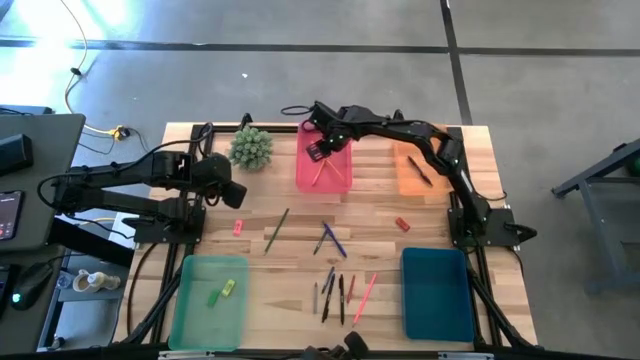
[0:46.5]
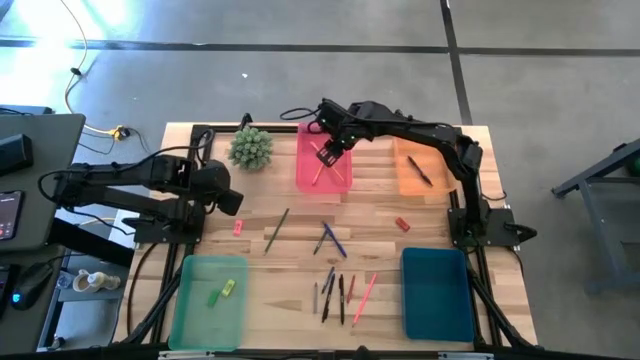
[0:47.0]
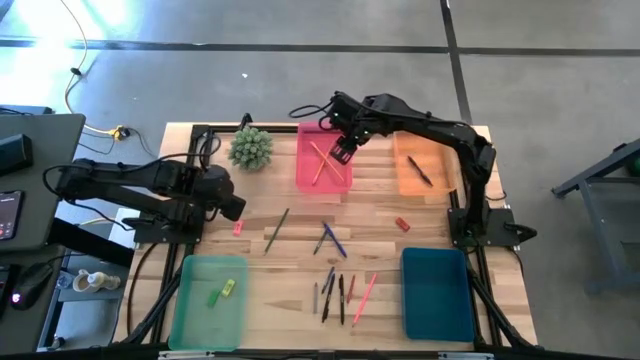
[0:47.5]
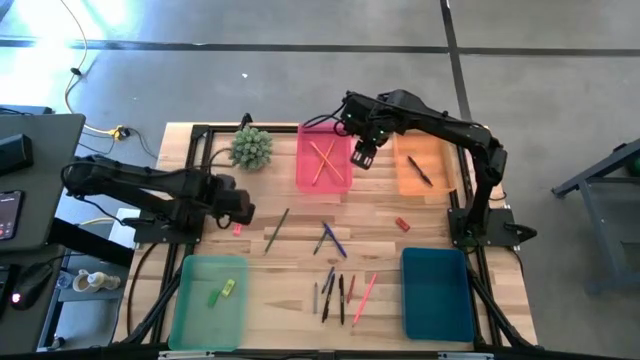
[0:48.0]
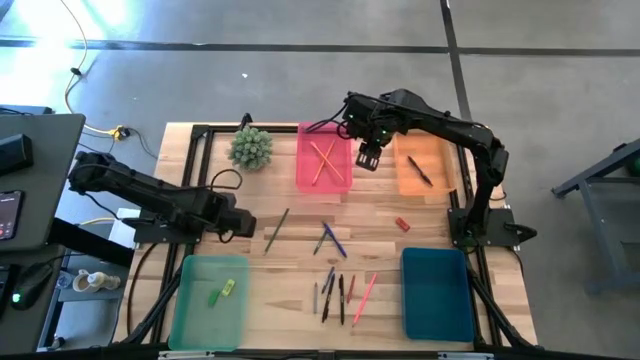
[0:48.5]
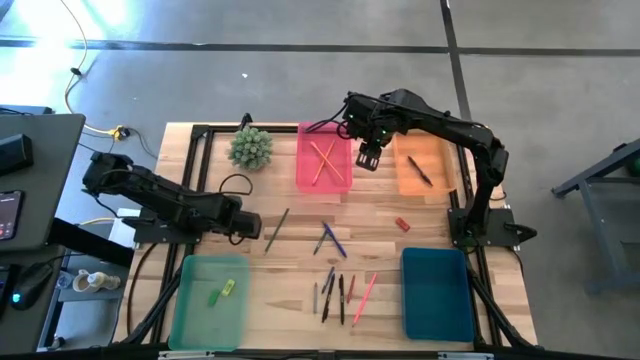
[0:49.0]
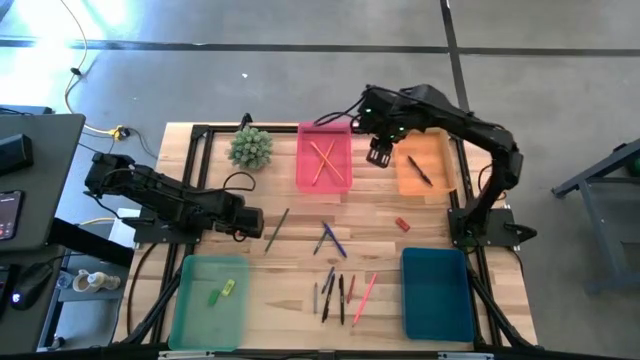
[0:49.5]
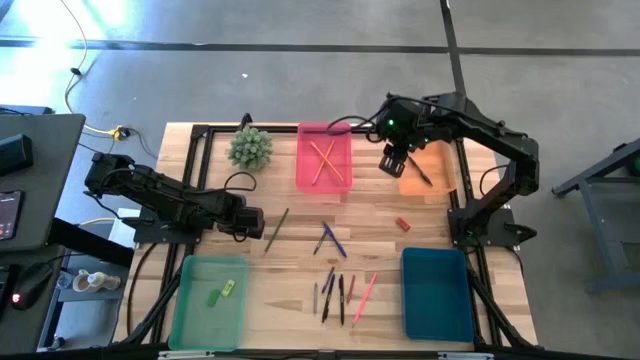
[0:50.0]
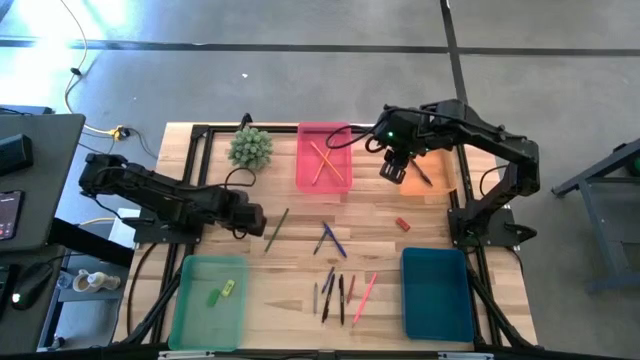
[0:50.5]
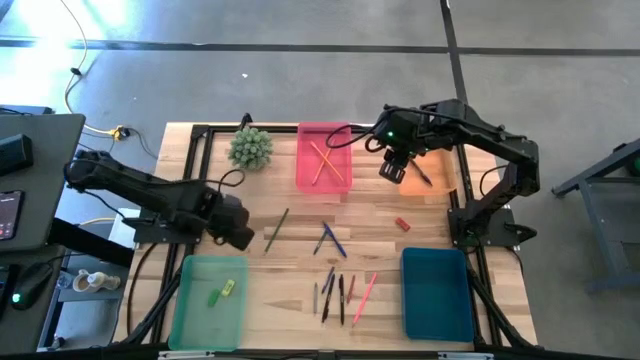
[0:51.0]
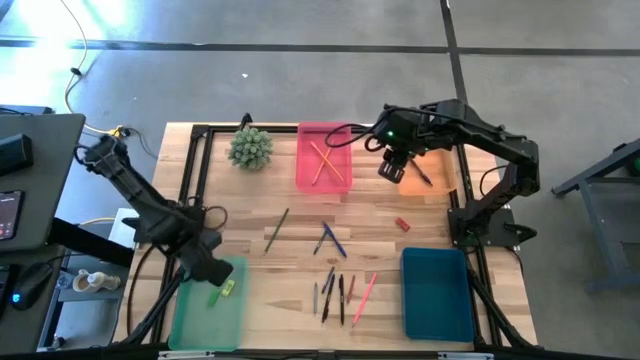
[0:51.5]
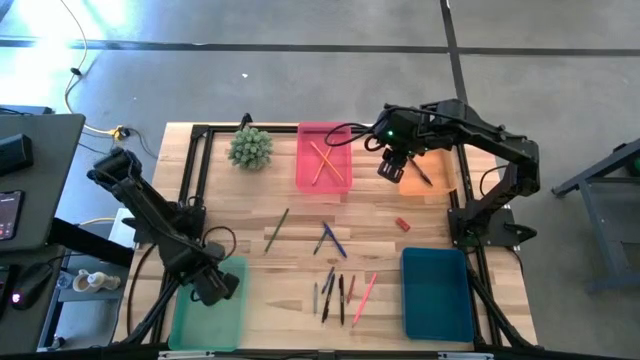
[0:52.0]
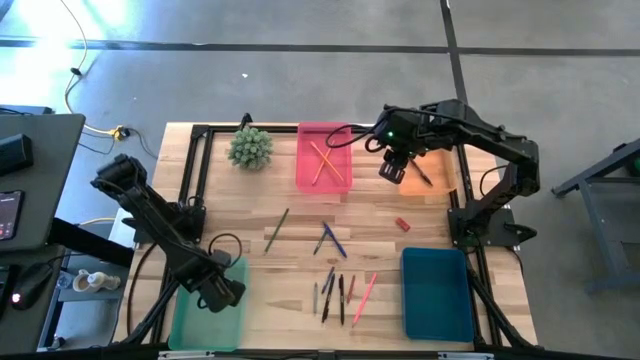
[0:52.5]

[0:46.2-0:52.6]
Task: Sort crayons/erasers/pens/pencils in bins
Put the pink eraser into the light green bin

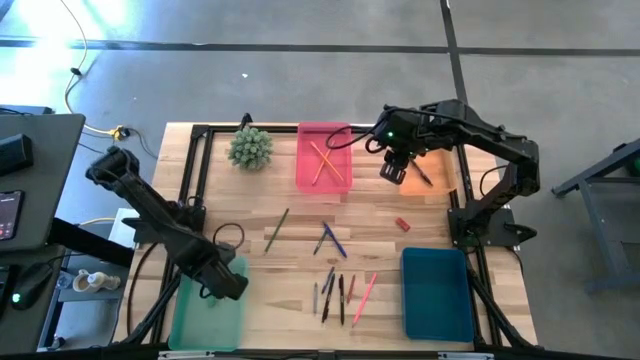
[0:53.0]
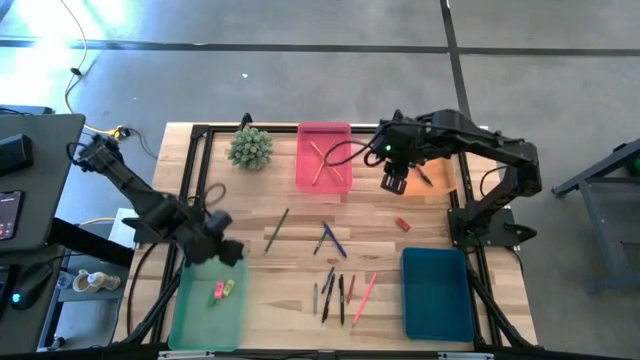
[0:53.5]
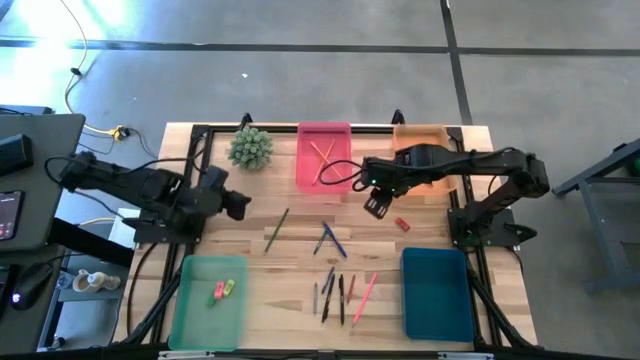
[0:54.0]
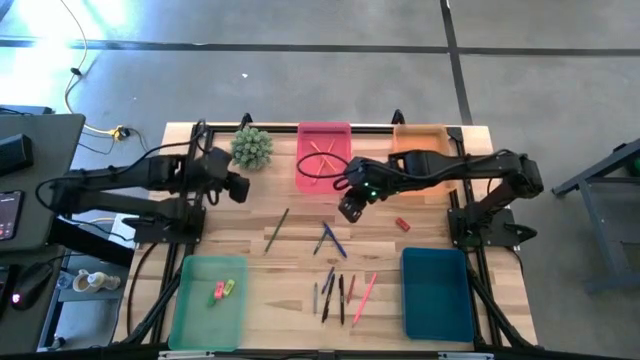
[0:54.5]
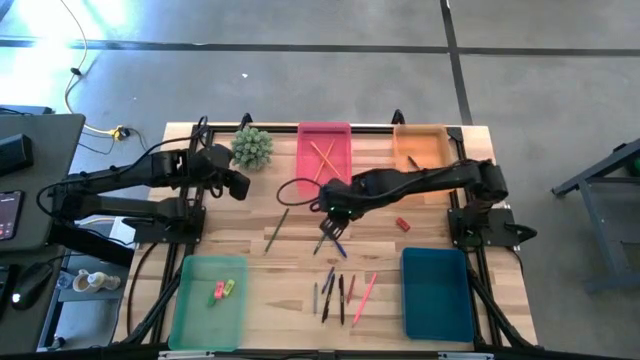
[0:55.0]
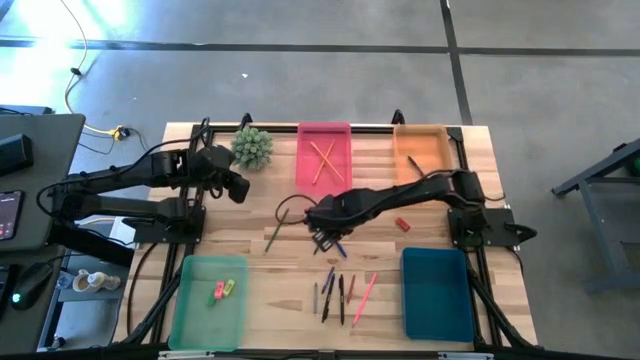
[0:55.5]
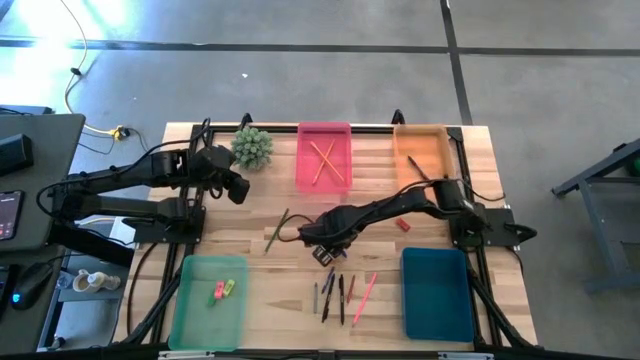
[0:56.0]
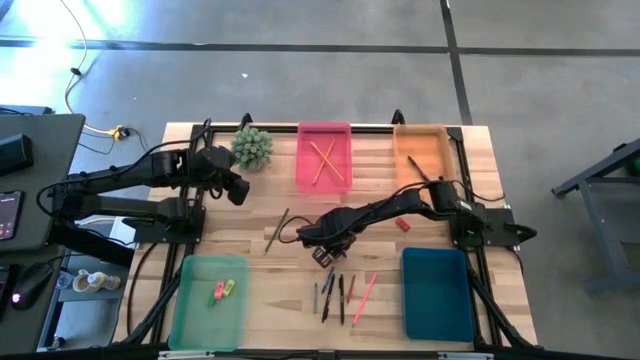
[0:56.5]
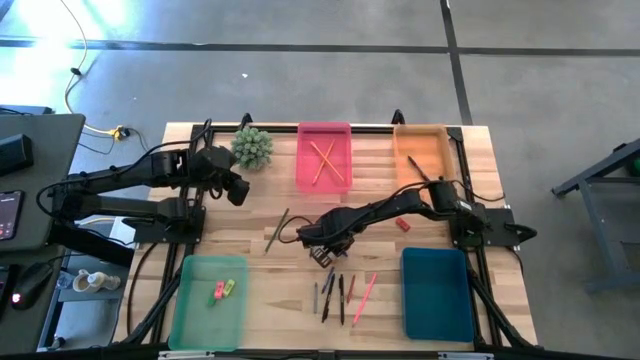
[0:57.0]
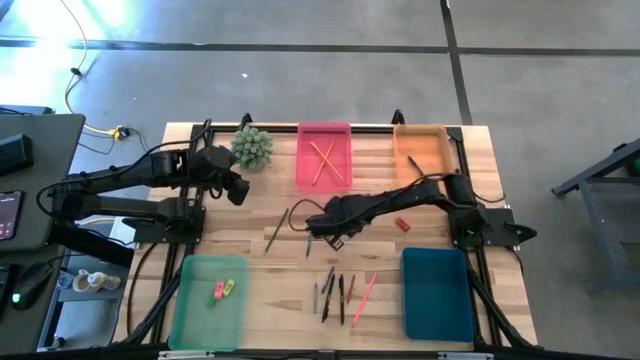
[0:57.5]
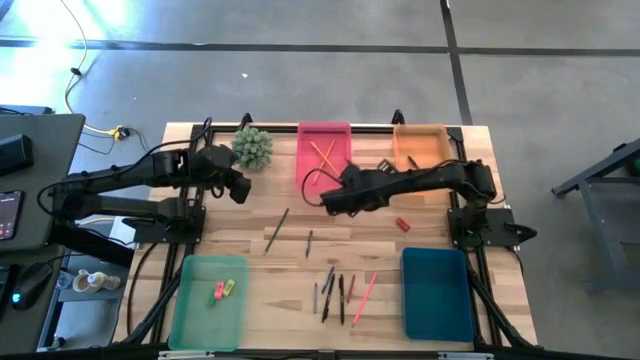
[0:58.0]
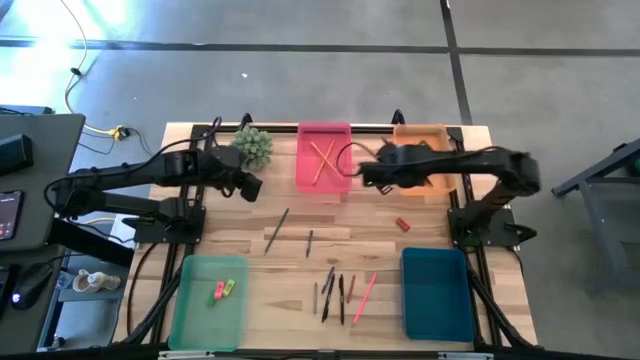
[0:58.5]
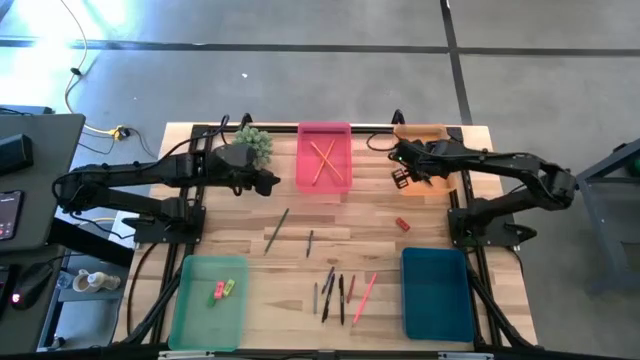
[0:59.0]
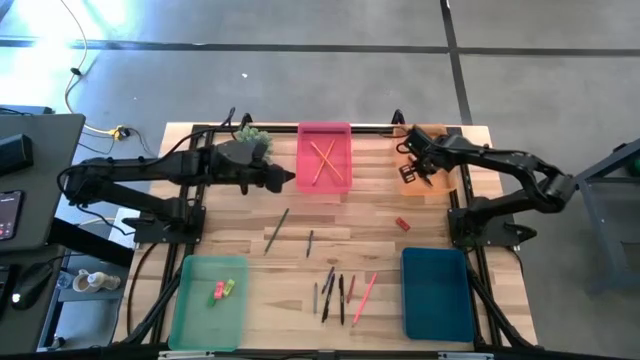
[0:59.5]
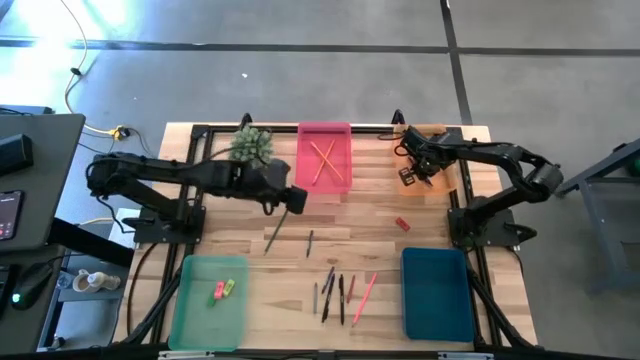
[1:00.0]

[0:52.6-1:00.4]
Put the blue pen into the orange bin

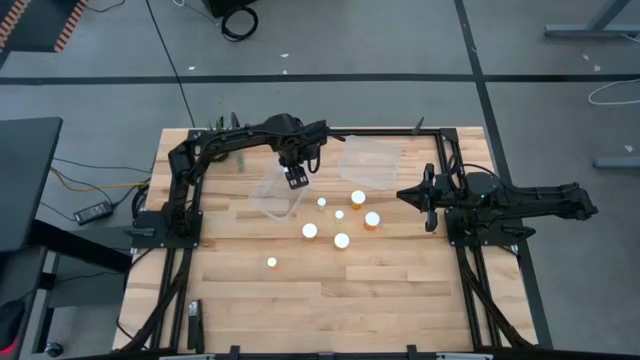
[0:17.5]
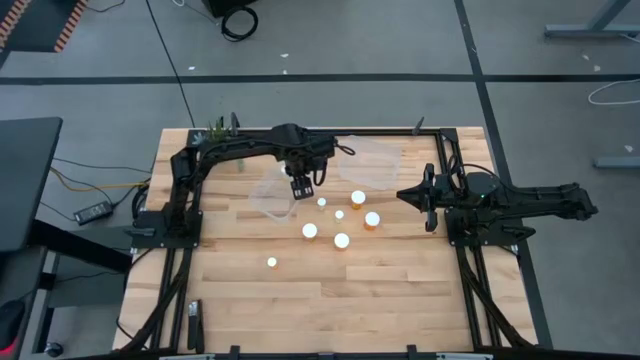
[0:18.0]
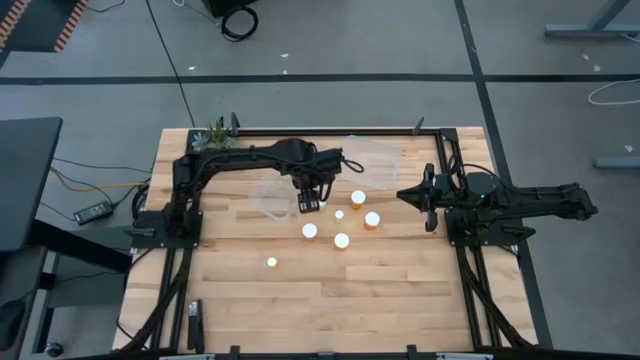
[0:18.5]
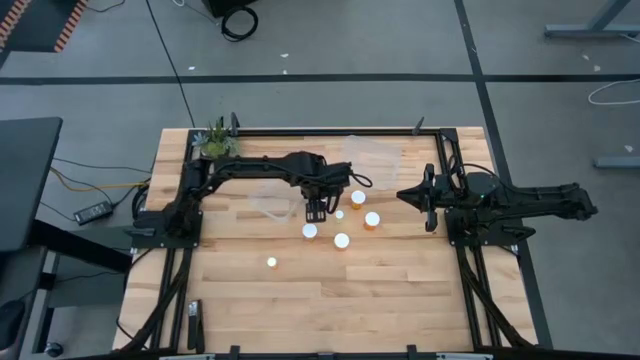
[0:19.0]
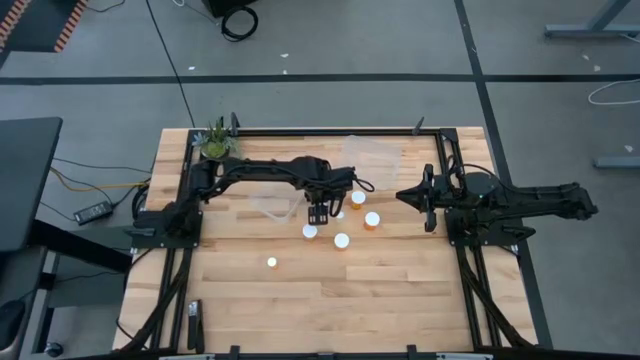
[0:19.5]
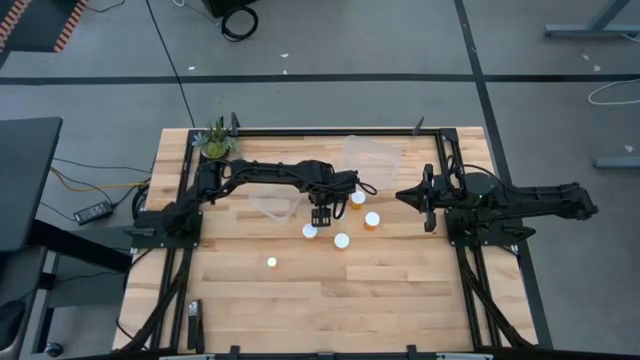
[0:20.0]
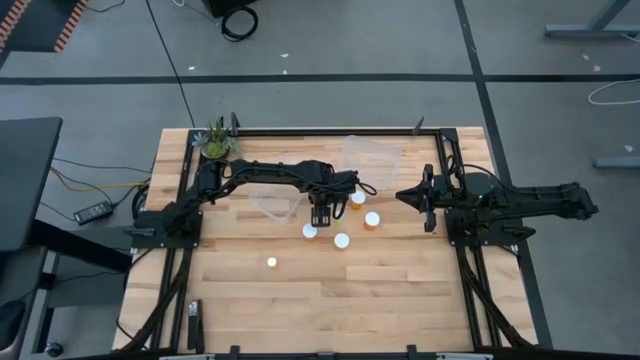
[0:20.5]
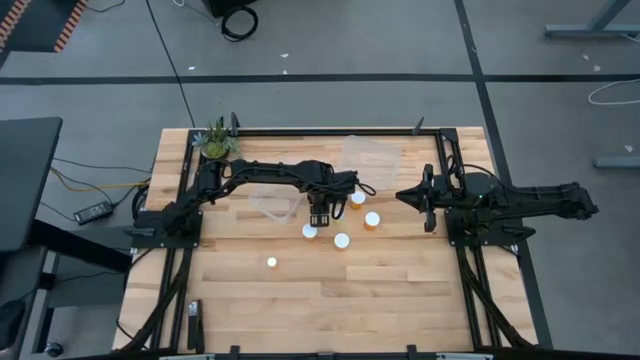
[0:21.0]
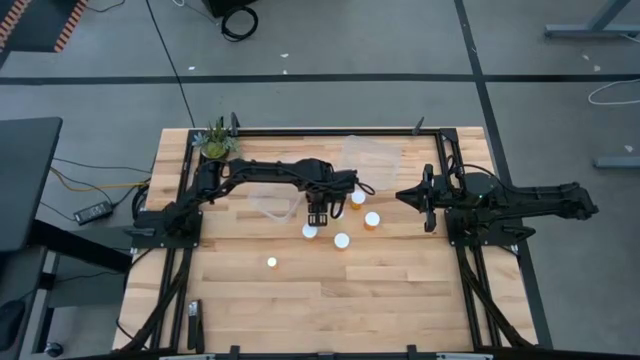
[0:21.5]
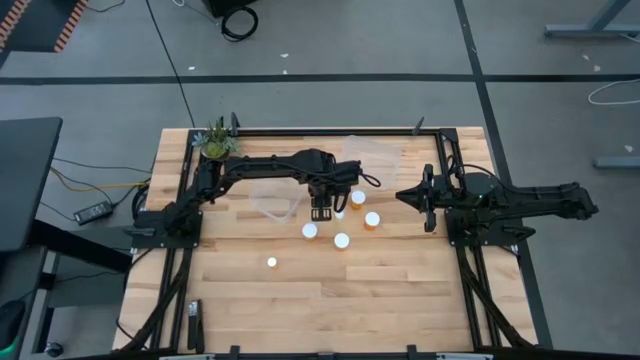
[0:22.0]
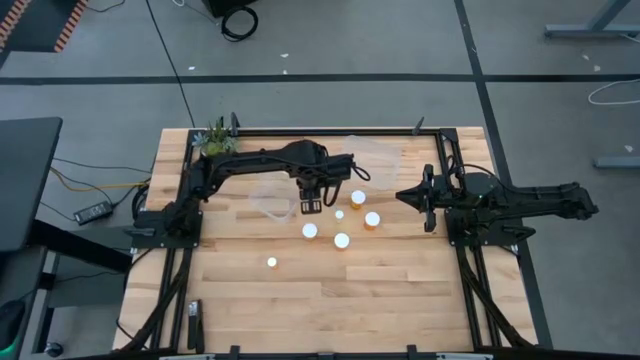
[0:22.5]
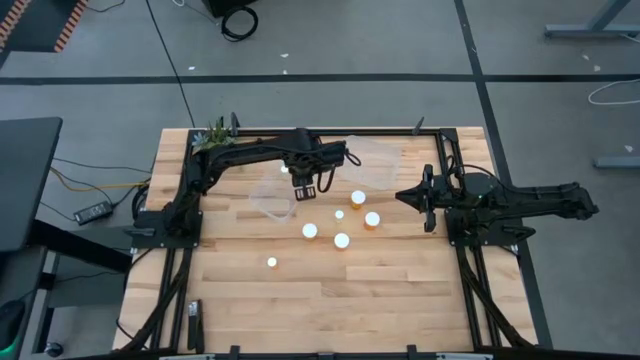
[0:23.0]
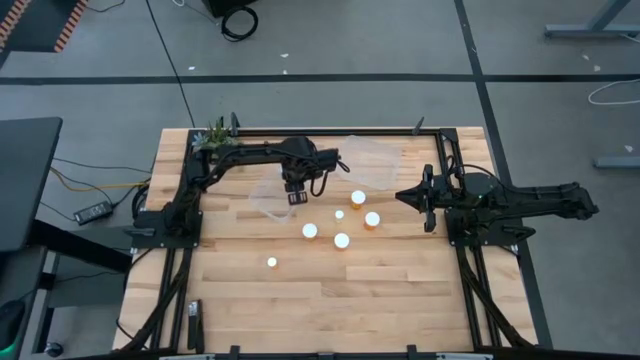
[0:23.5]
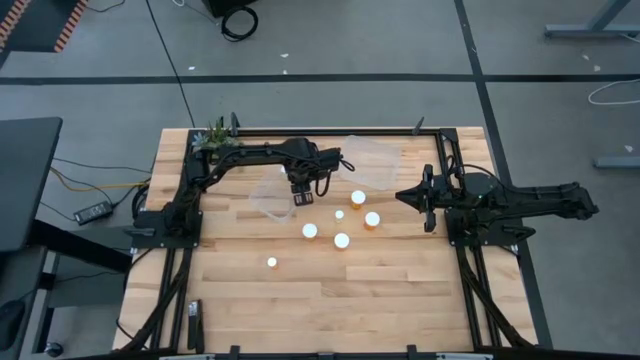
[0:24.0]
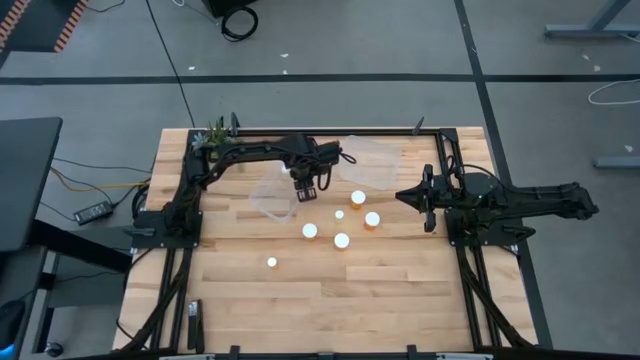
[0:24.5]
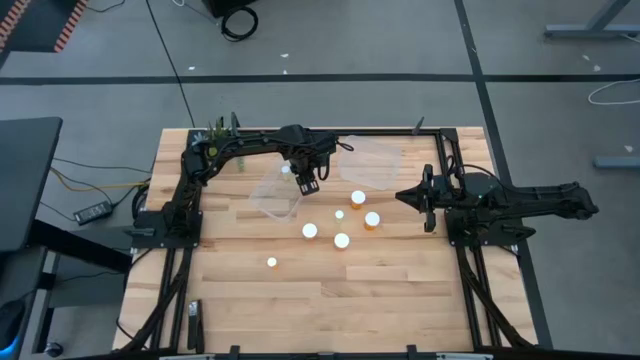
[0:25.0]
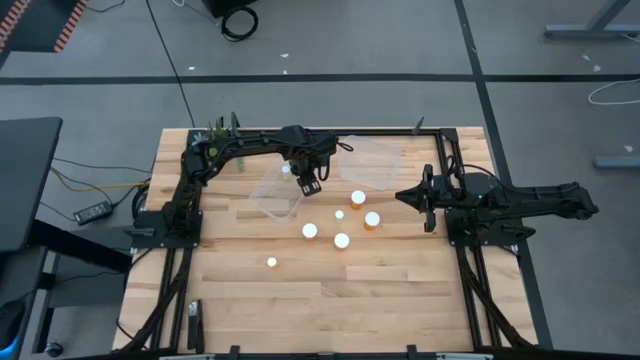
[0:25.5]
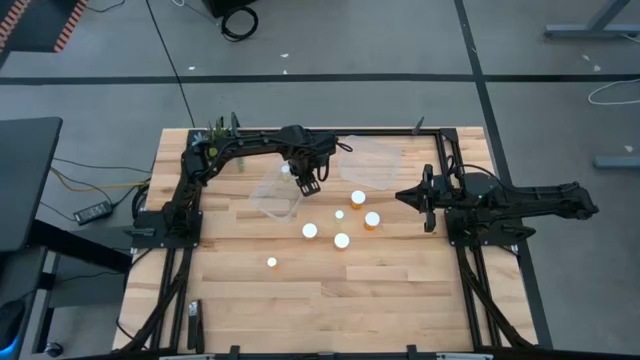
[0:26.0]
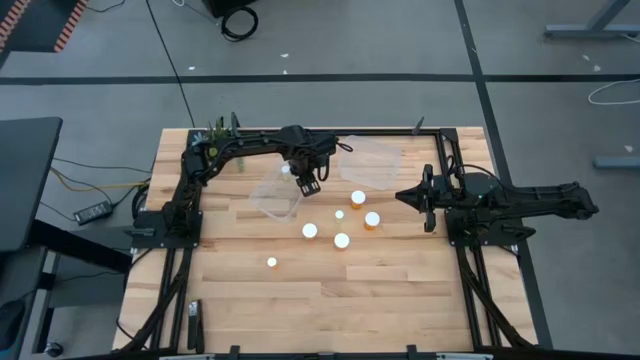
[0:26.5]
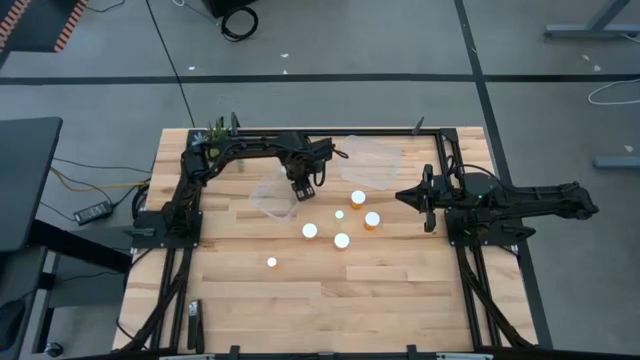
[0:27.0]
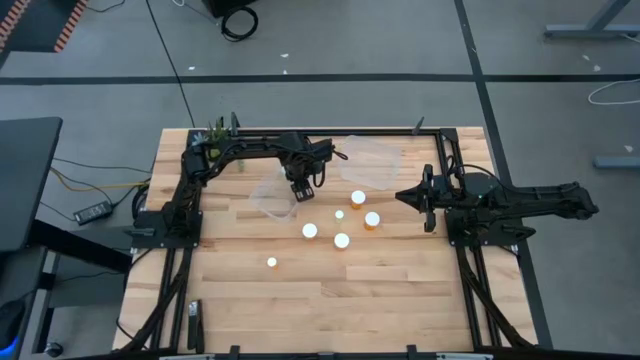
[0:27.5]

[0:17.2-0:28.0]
Task: Pick and place medicine bottles into bin by pill shape (circle, oval)
Put the small yellow pill bottle into the left transparent bin
